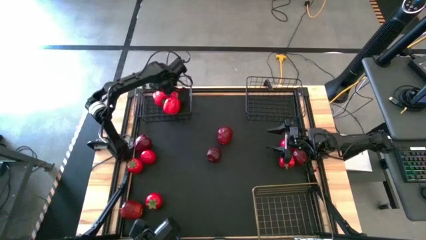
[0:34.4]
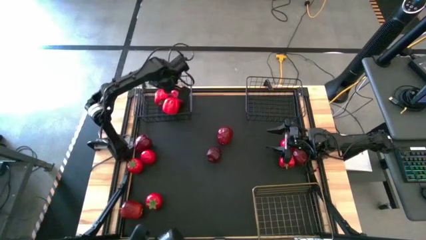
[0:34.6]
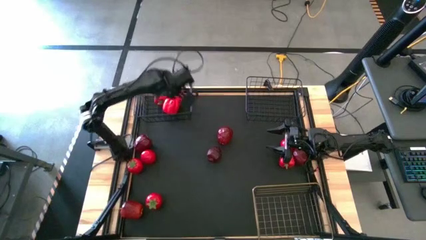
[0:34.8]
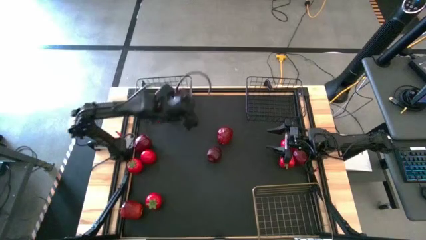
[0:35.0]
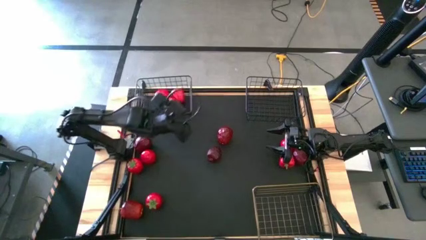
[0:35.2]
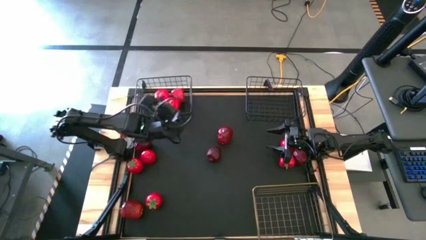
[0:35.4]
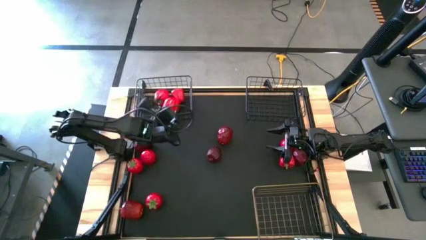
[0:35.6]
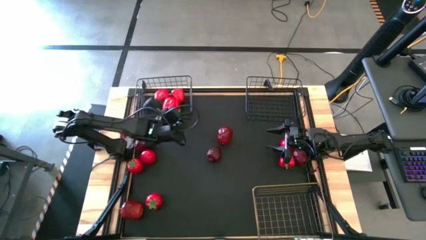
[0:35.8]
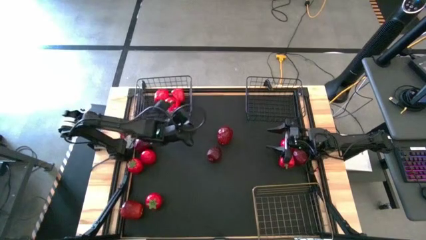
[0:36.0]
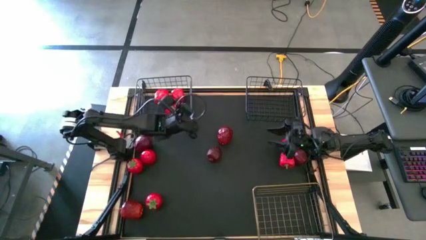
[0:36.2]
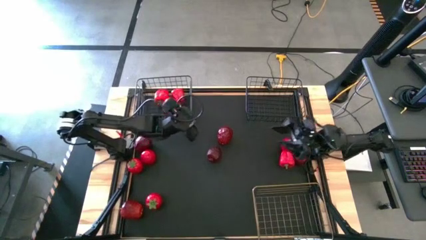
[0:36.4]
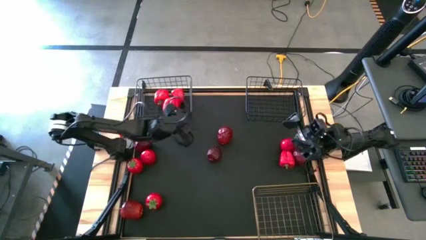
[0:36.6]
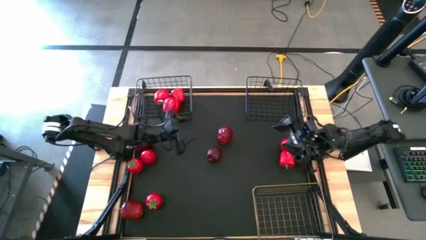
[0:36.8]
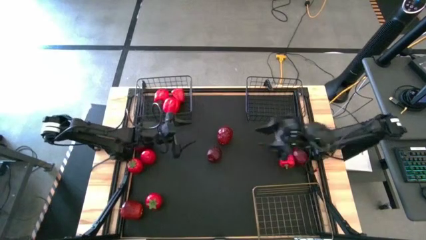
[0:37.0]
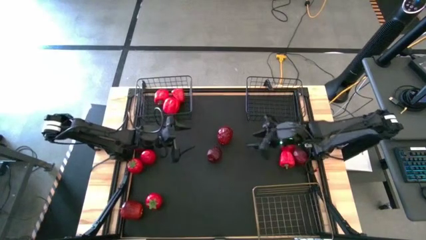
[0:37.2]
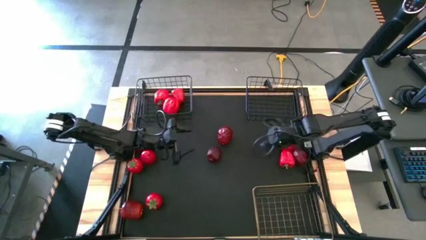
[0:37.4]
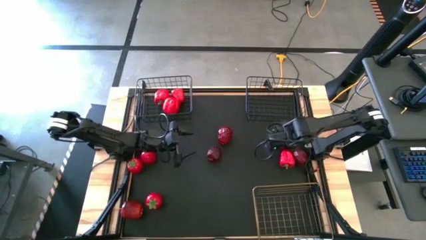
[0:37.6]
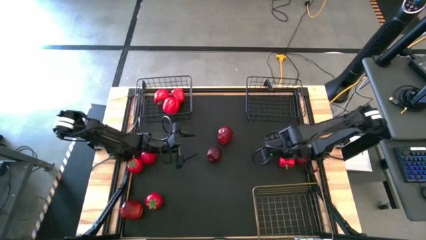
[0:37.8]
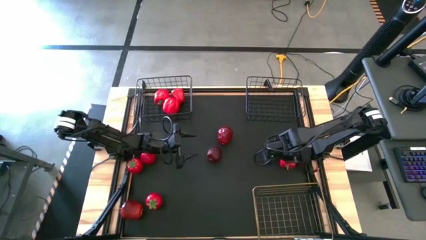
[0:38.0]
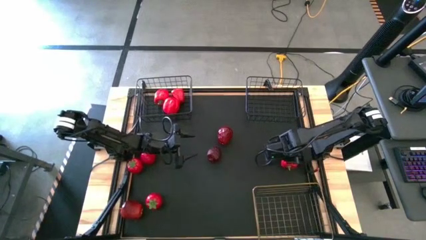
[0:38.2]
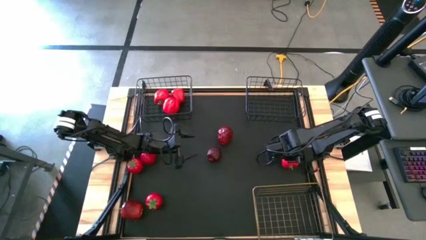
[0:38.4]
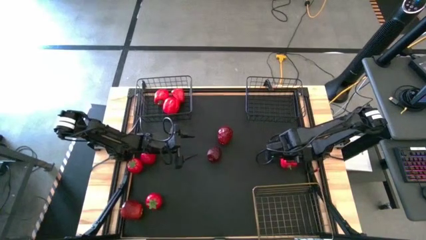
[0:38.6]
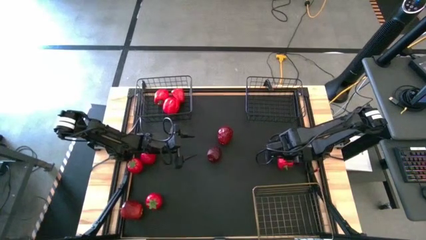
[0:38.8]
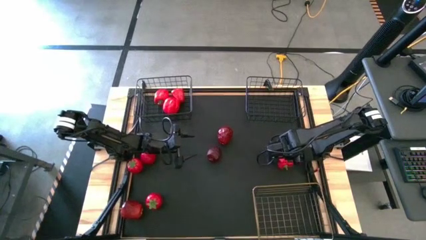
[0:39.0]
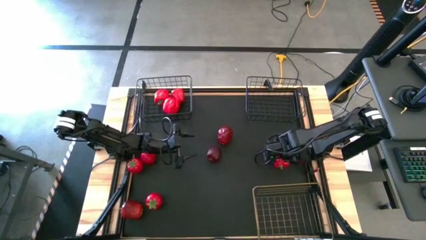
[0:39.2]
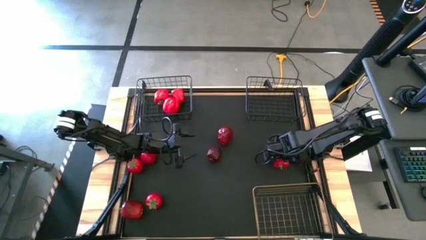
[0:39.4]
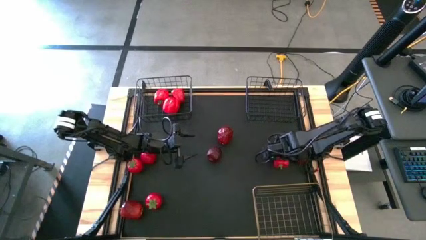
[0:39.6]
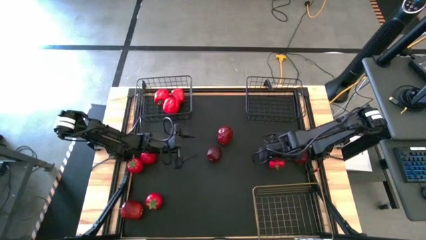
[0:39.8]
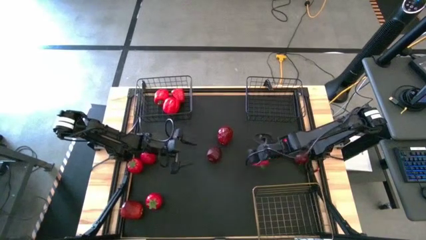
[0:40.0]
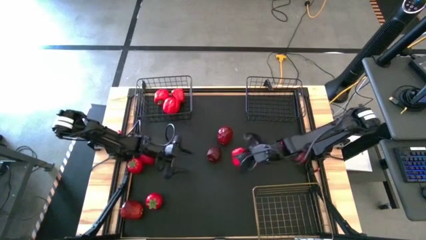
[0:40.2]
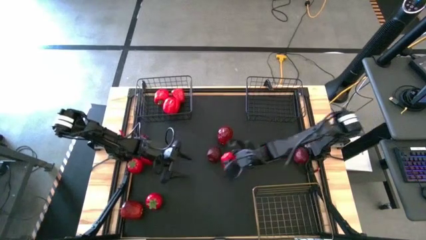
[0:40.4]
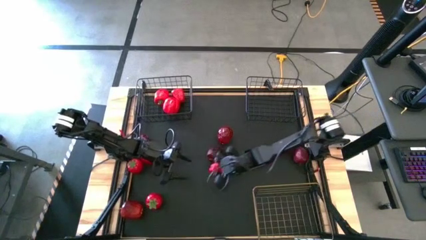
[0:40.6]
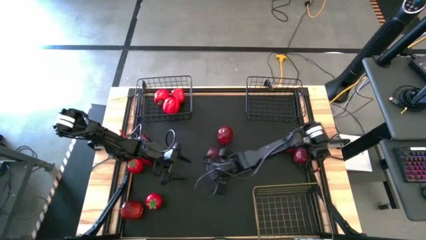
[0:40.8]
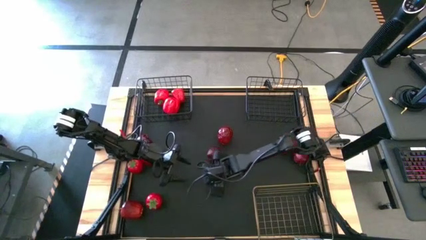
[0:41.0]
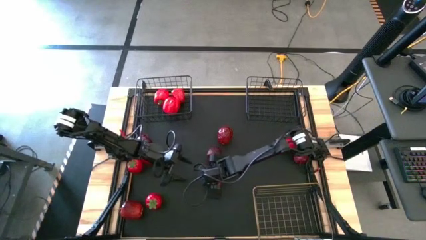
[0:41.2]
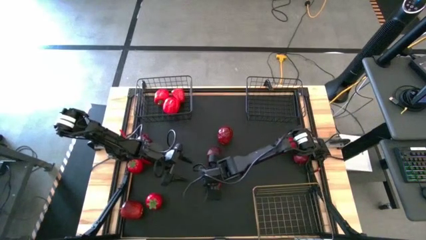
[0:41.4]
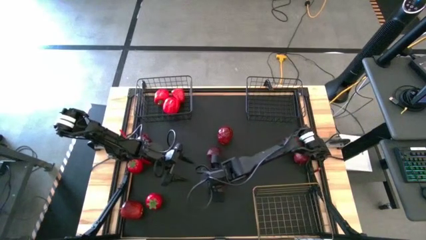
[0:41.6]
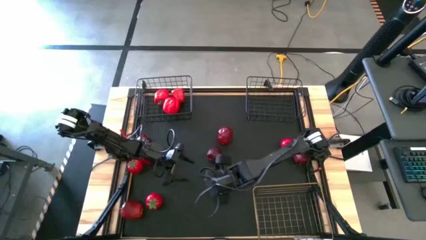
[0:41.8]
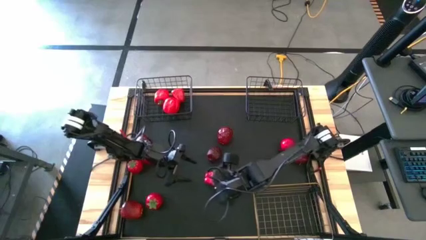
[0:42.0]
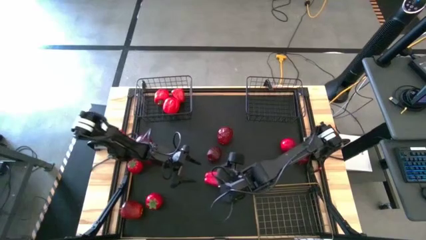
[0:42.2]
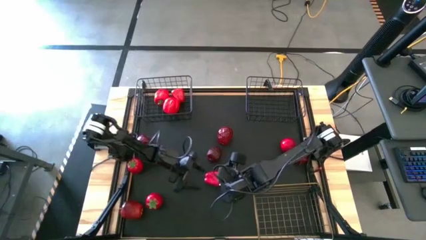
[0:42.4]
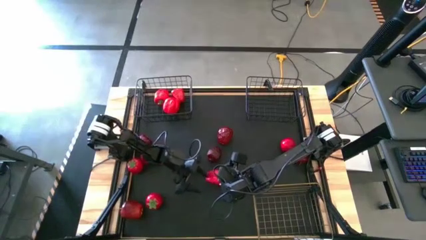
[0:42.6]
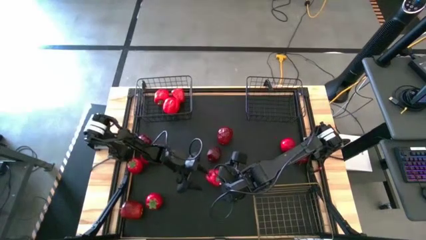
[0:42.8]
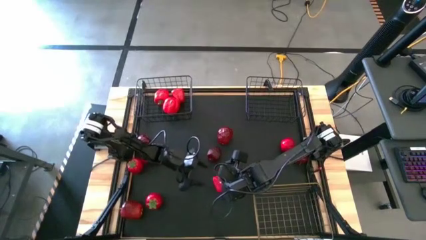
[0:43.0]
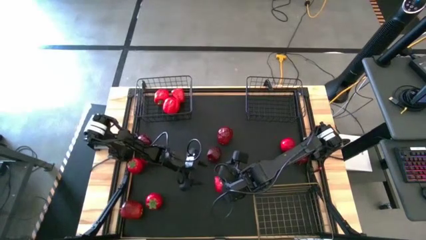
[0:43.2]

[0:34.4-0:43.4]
Task: Sort produce into baskets
Put the bell pepper into the left black wire basket

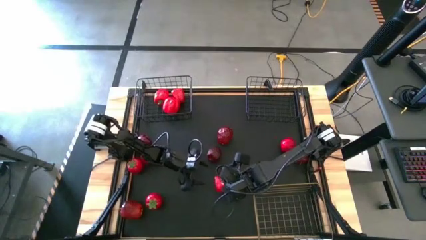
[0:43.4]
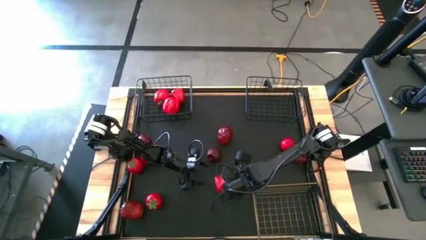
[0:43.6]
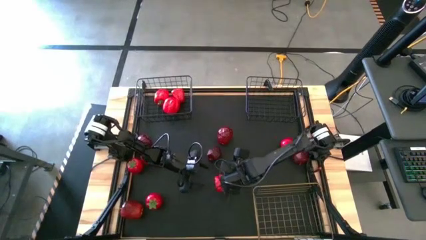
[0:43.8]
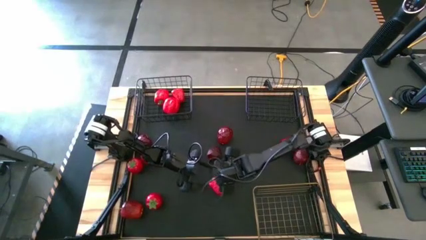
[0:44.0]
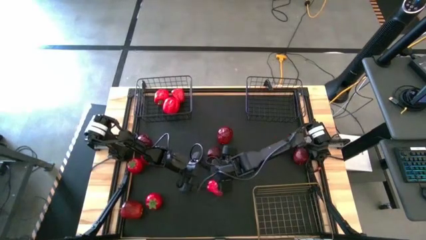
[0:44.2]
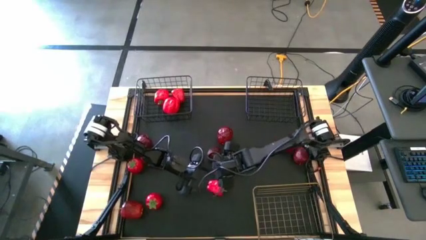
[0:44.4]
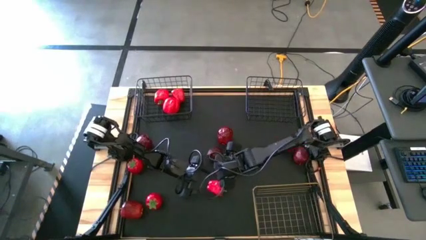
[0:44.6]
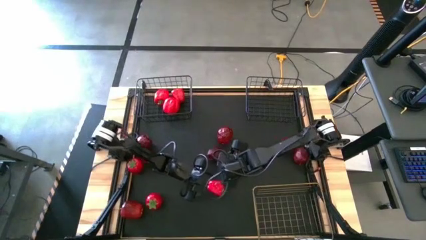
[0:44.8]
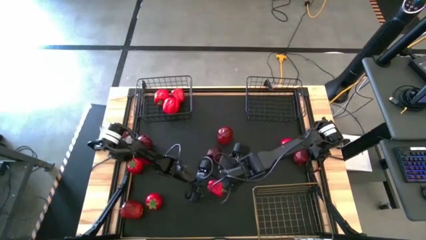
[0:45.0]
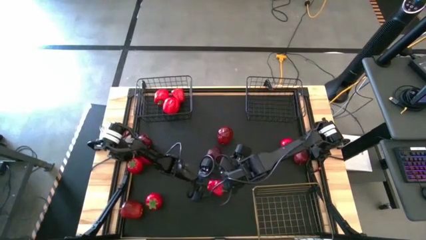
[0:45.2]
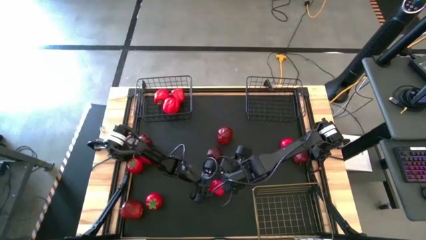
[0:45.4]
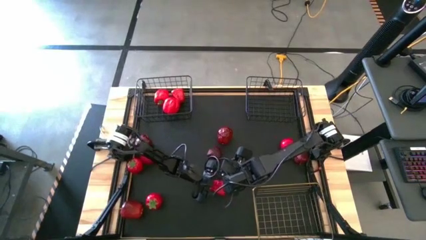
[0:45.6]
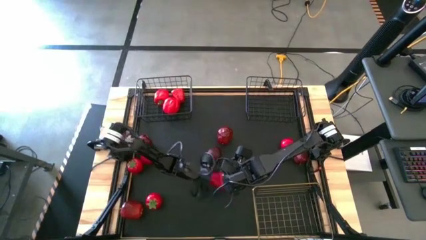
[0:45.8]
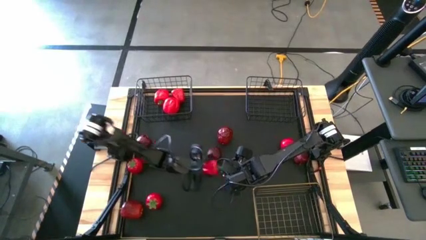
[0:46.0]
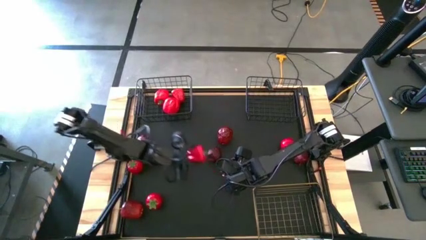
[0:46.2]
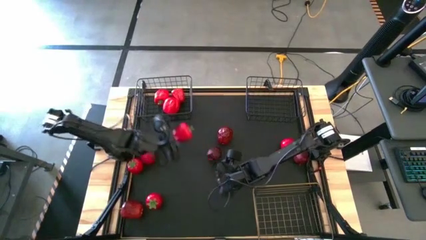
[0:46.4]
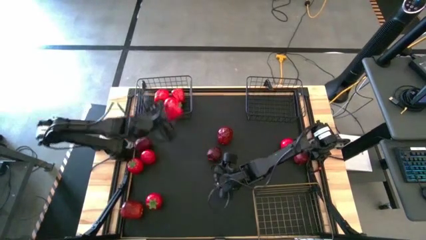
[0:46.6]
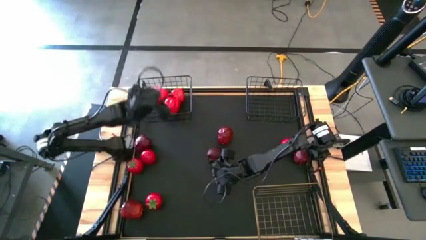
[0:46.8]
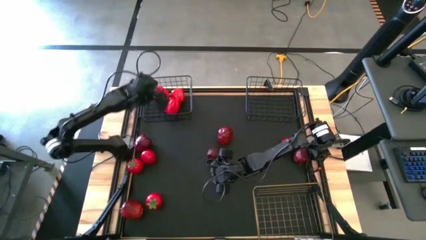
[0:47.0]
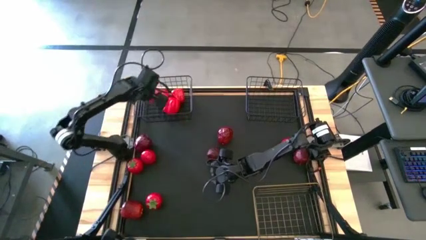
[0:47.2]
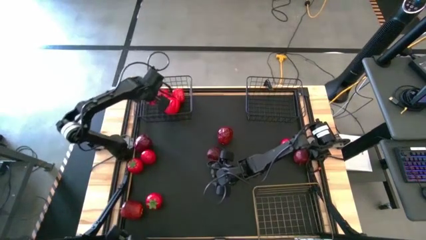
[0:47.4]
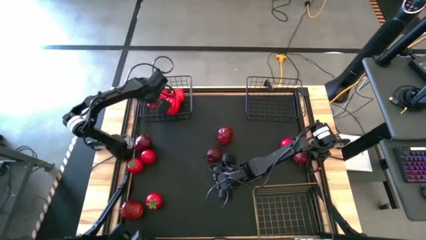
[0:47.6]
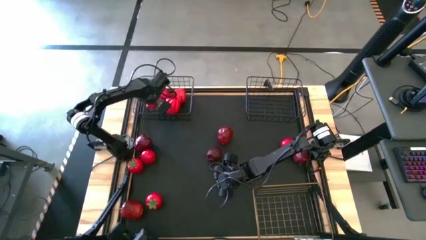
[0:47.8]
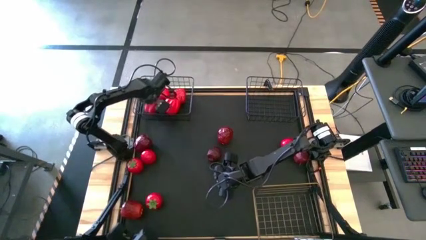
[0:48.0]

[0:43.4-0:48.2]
Put the bell pepper into the left black wire basket

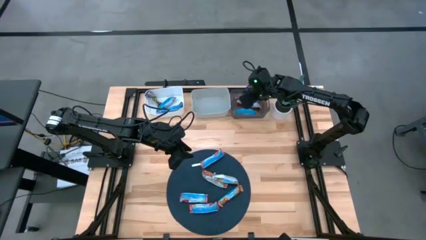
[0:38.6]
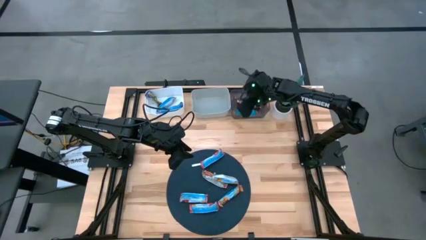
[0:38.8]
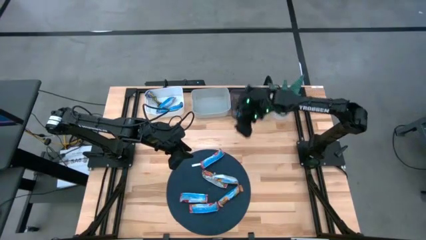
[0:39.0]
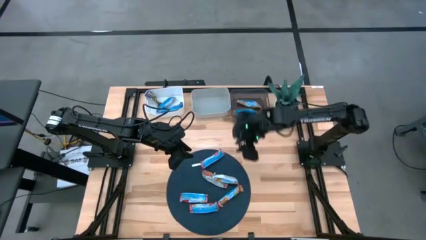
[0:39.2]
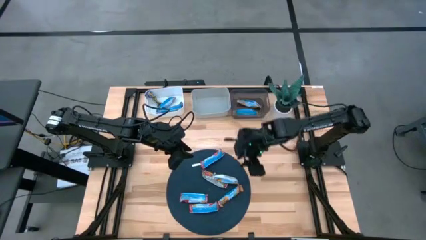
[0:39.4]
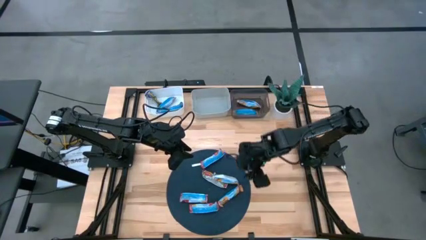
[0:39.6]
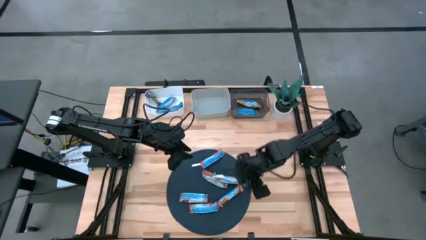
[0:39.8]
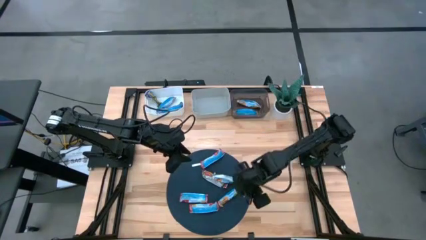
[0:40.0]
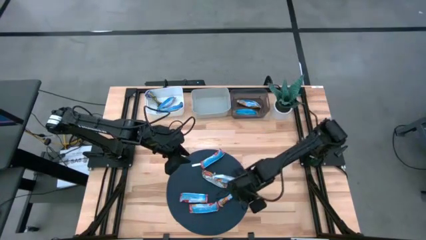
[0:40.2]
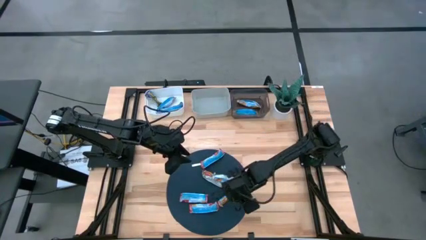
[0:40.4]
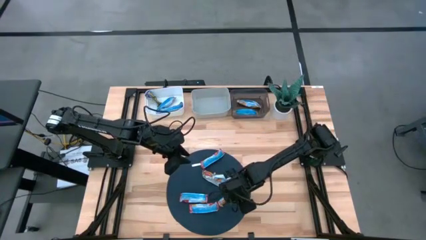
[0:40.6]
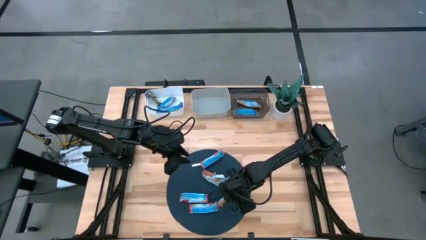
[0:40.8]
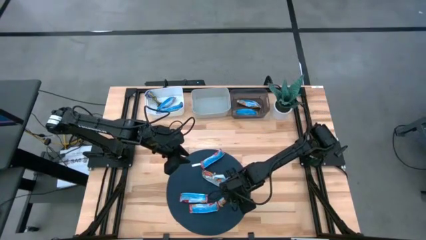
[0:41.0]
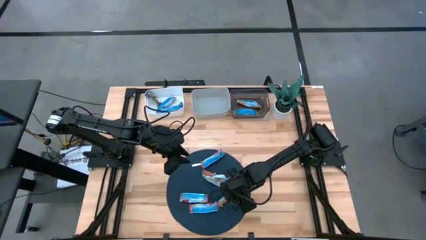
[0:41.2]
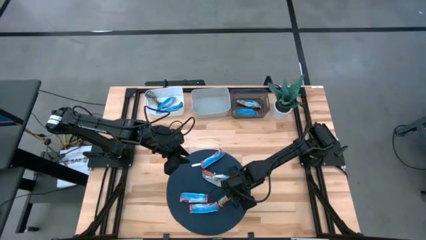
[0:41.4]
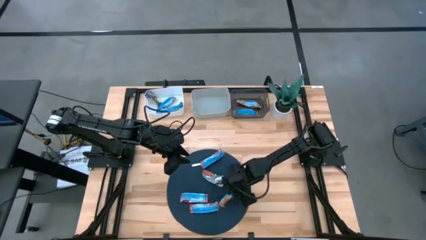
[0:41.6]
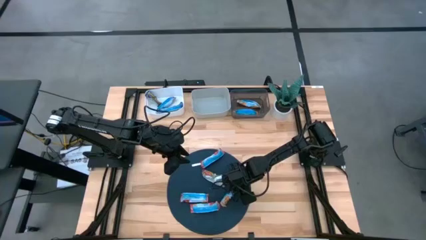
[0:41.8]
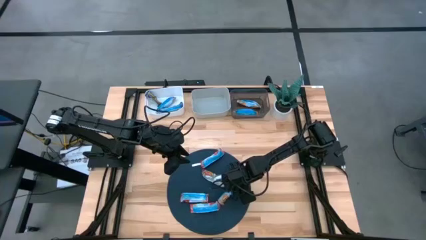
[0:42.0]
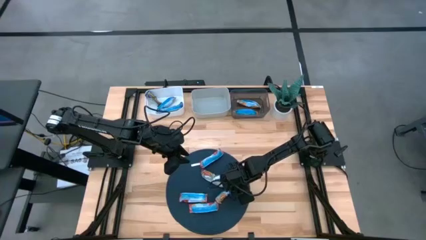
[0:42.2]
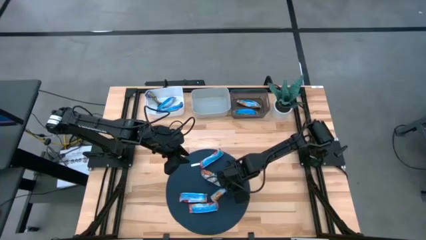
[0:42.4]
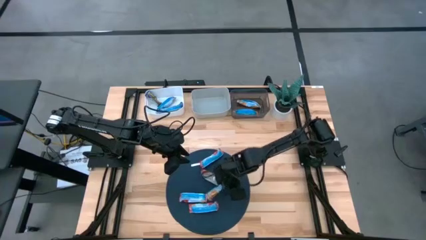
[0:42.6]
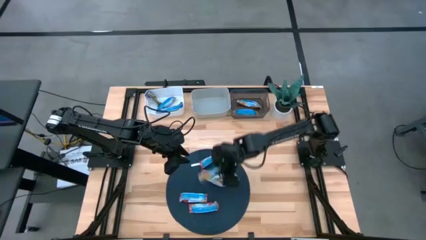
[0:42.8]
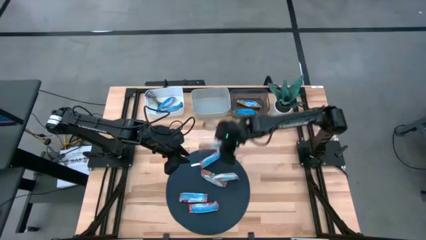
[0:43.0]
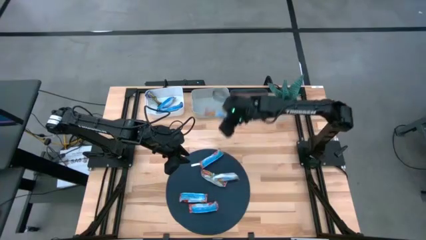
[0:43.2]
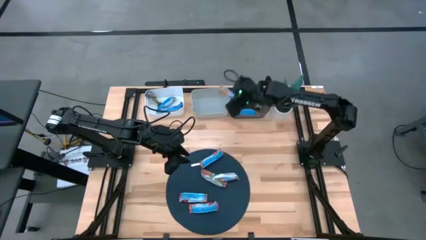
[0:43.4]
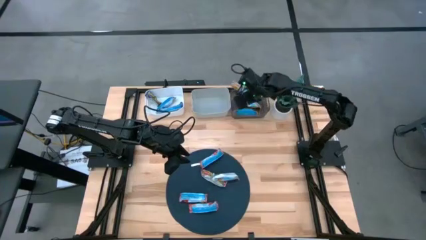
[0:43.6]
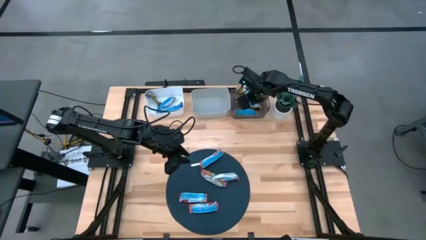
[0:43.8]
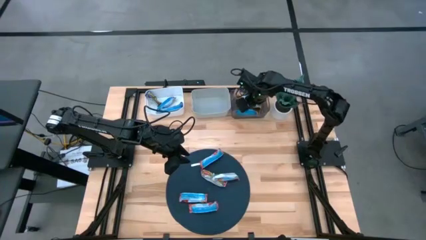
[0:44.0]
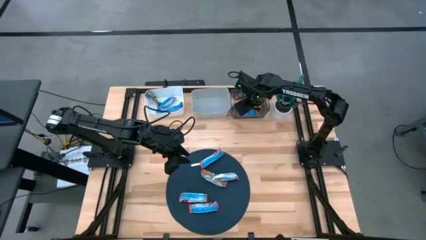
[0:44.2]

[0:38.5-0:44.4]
Task: Pick and place Granola Bars by type
Put the yellow granola bar into the black bin
